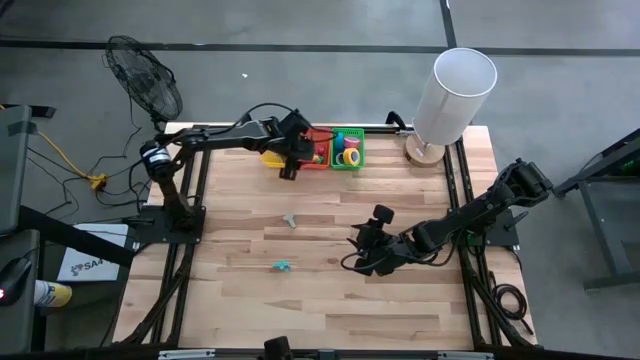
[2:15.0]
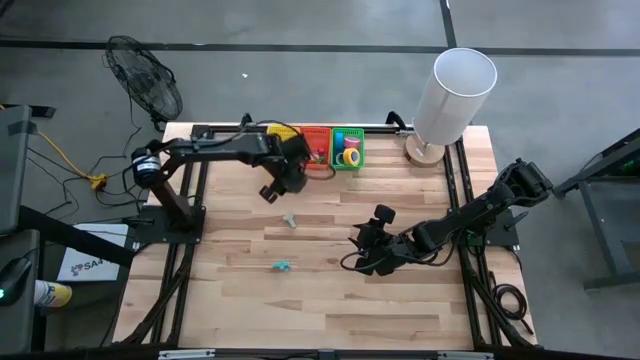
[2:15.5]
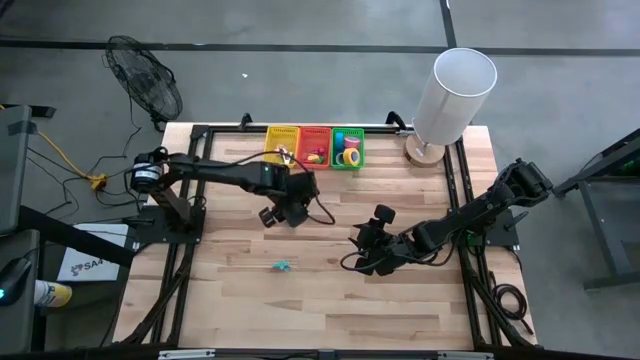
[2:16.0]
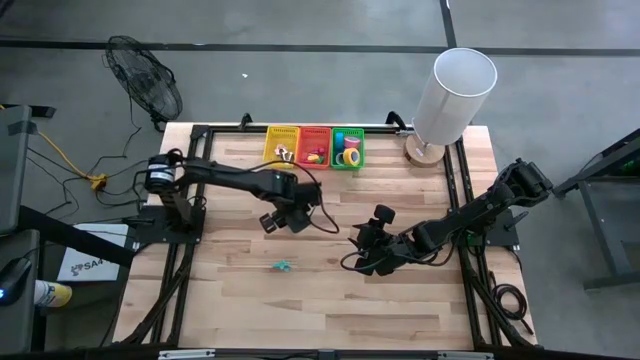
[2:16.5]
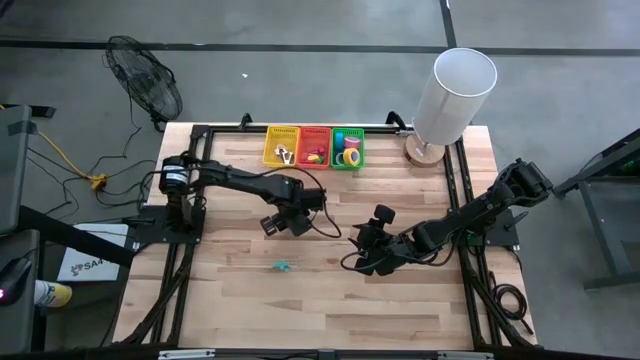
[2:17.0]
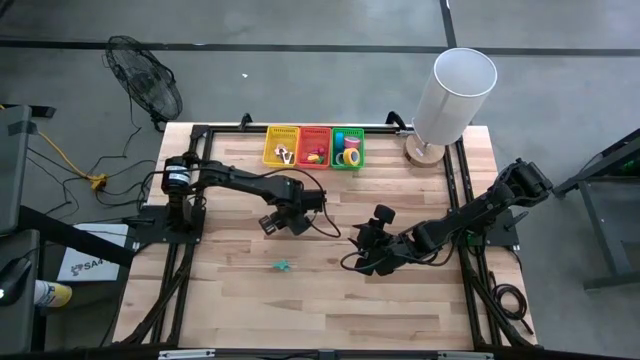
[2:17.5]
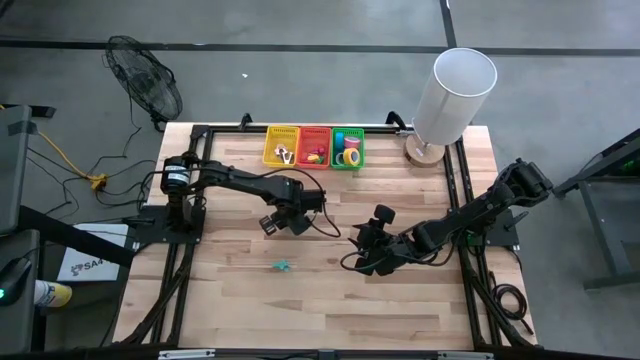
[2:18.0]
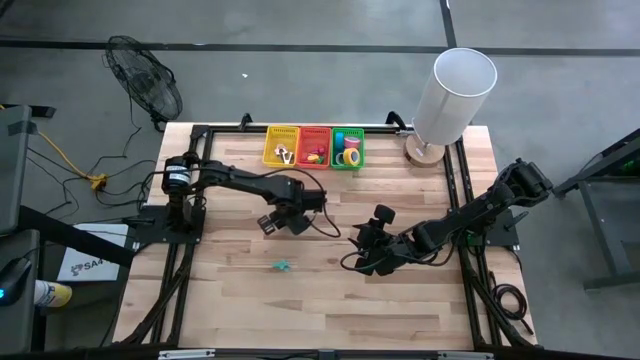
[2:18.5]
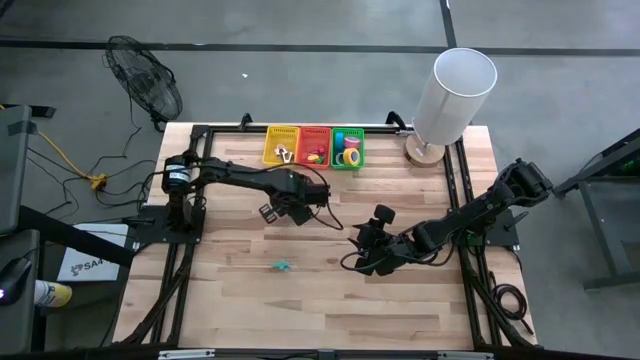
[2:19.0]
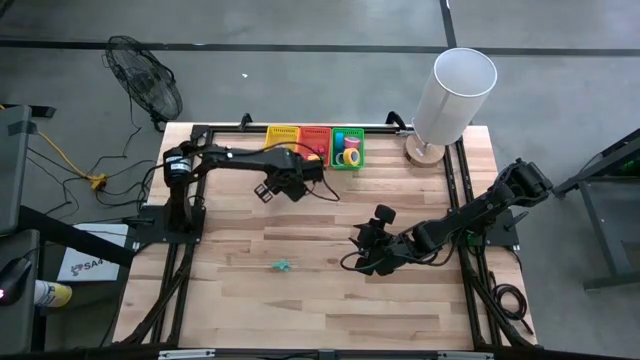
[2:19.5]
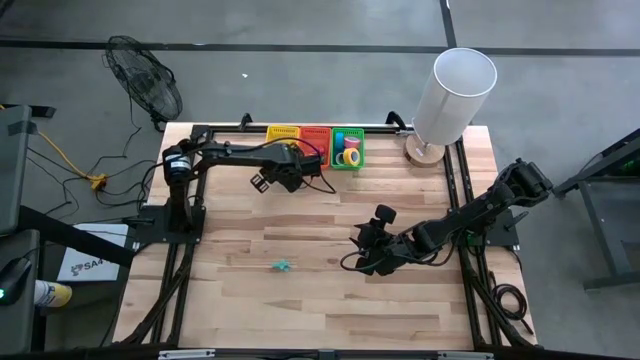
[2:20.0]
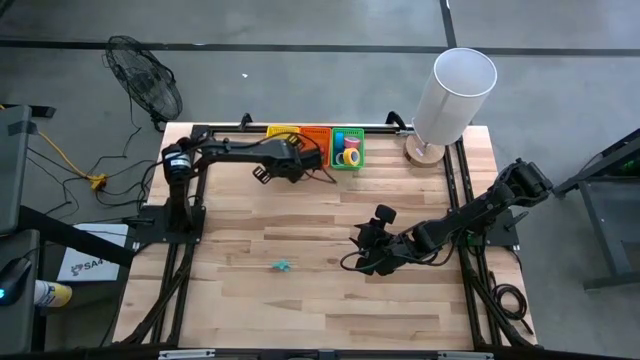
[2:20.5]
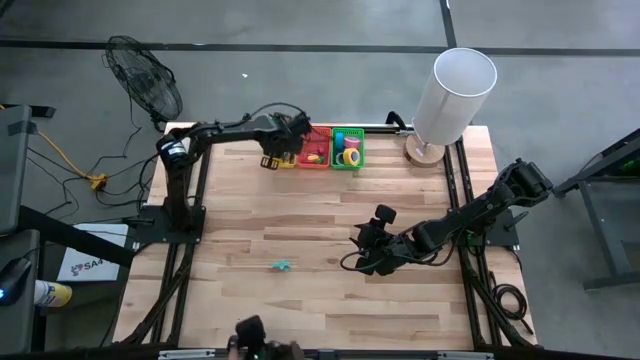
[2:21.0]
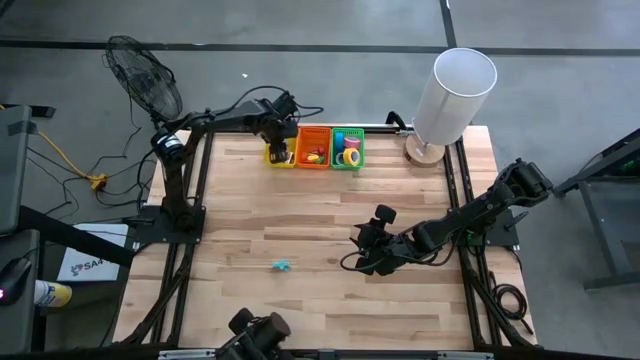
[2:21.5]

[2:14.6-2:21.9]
Task: Pick and place Stapler, Stapler remover, tape
Put the gray staple remover into the yellow basket

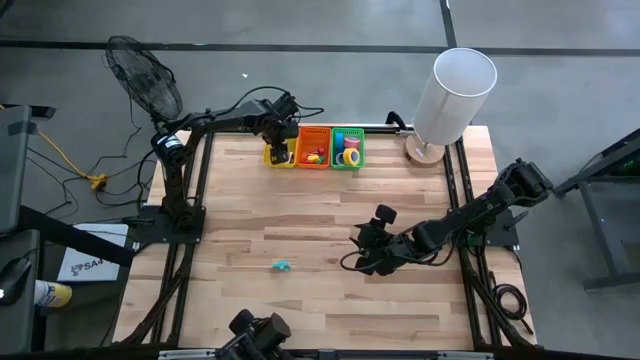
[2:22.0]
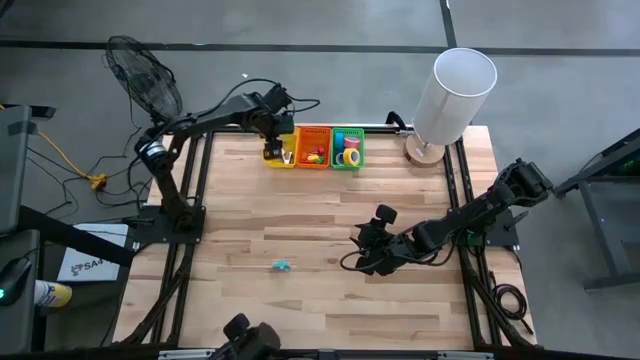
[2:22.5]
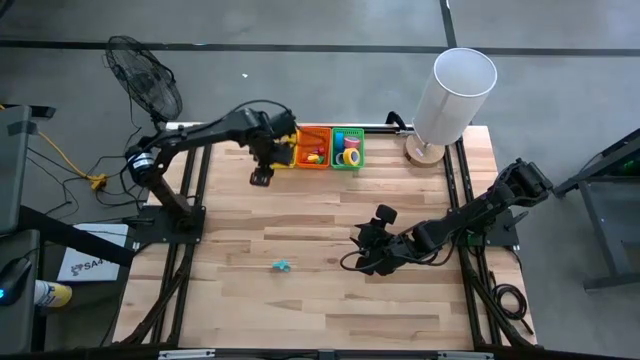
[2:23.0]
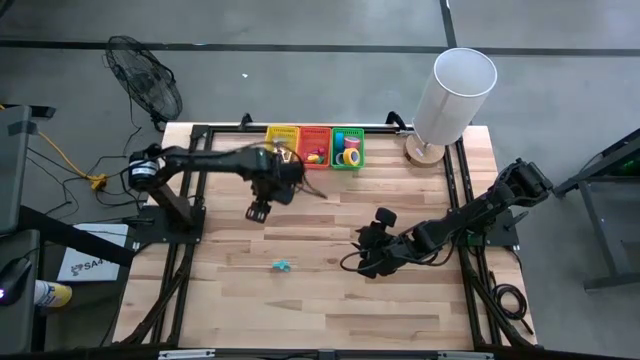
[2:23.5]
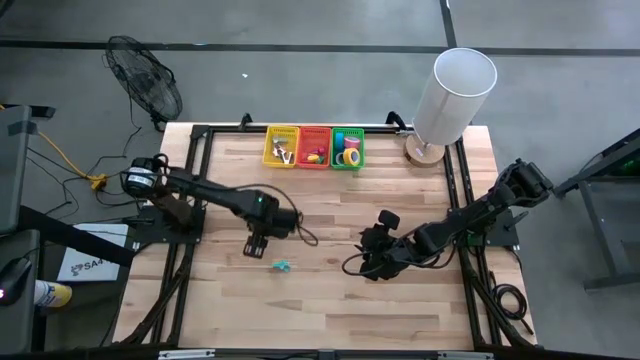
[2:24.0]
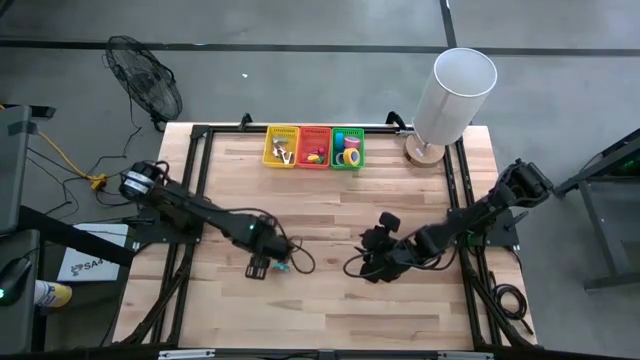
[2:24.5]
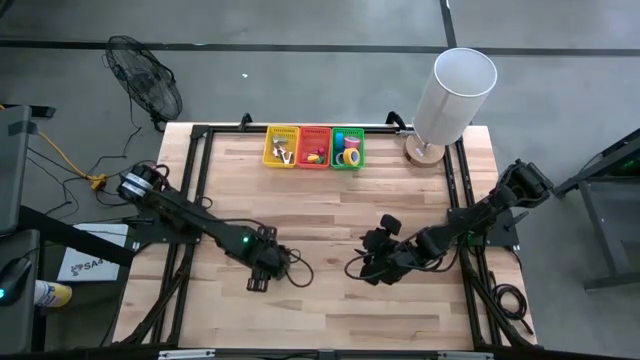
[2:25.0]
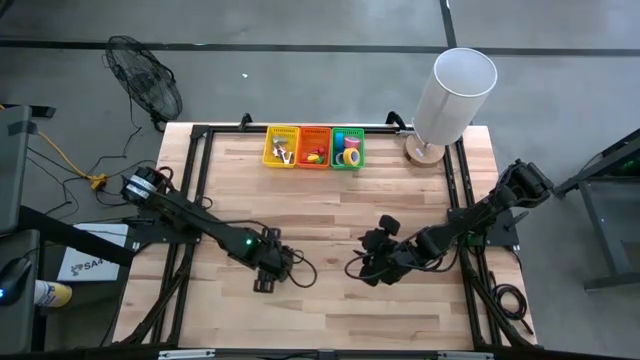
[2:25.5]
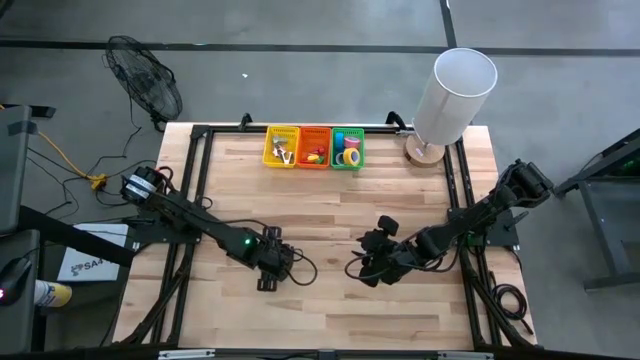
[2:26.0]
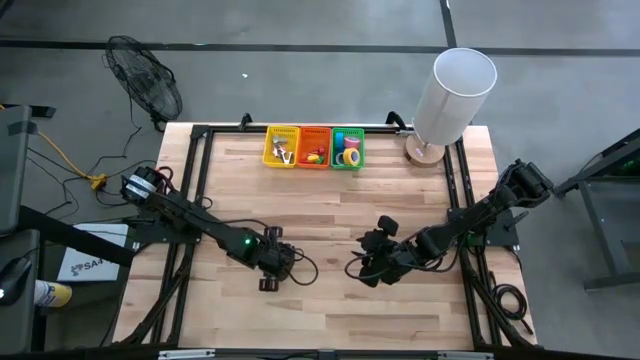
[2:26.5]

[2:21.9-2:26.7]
Put the light blue staple remover into the yellow basket

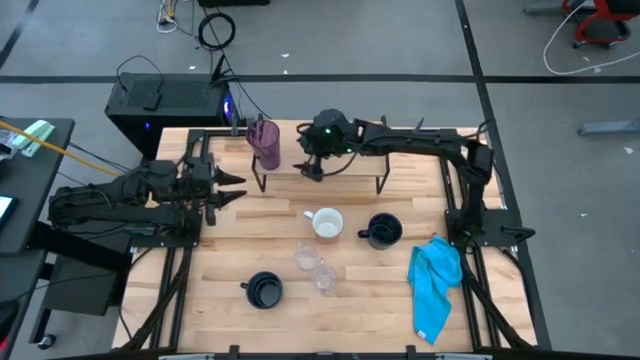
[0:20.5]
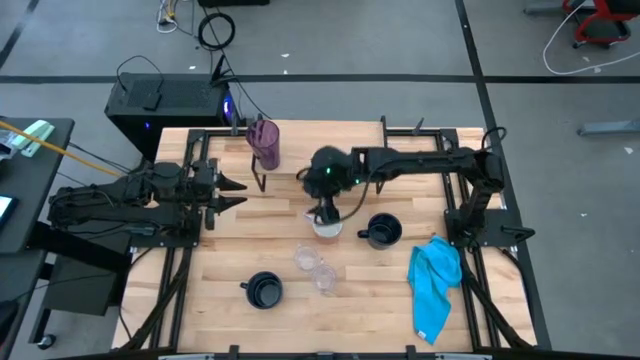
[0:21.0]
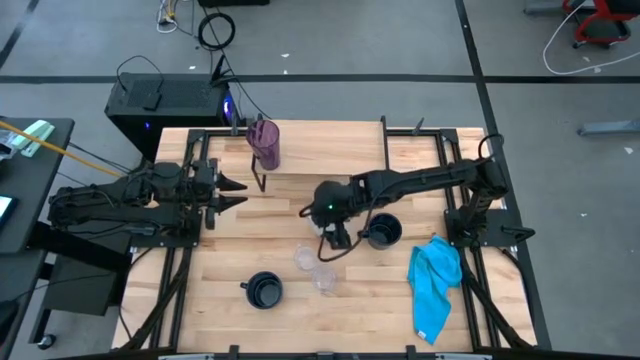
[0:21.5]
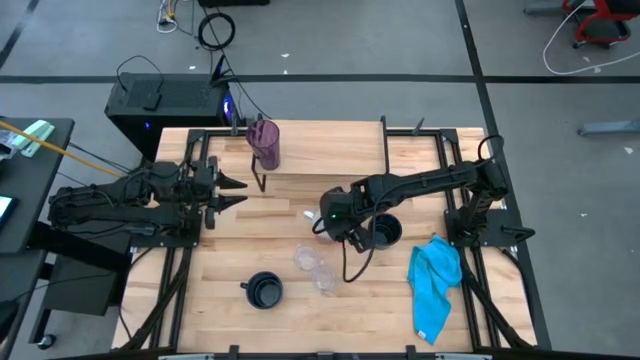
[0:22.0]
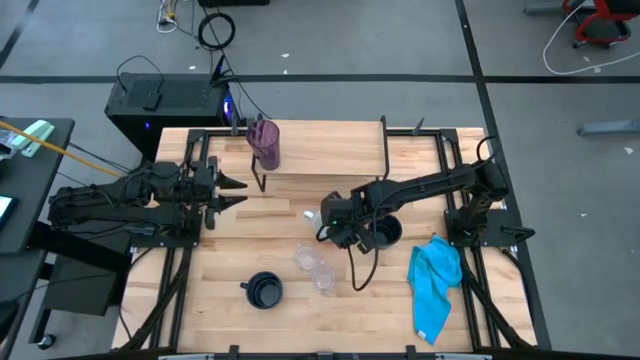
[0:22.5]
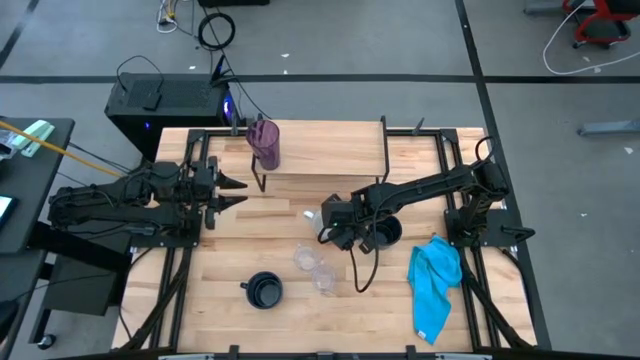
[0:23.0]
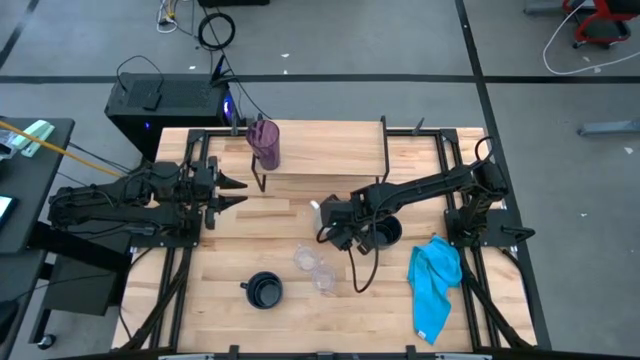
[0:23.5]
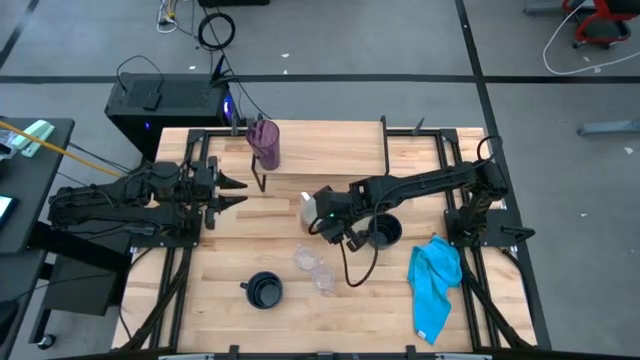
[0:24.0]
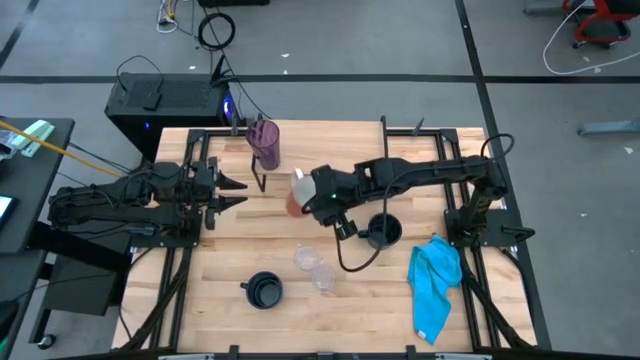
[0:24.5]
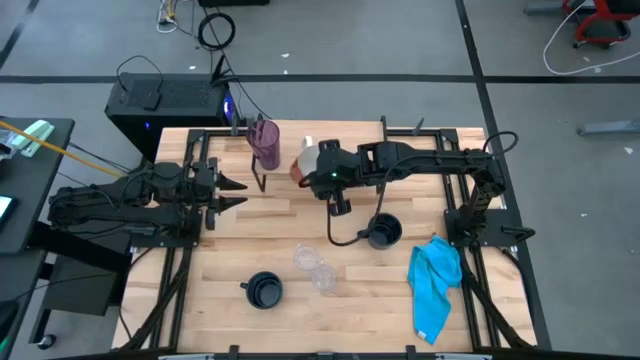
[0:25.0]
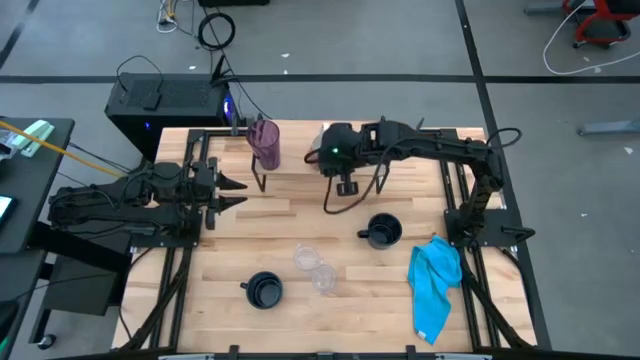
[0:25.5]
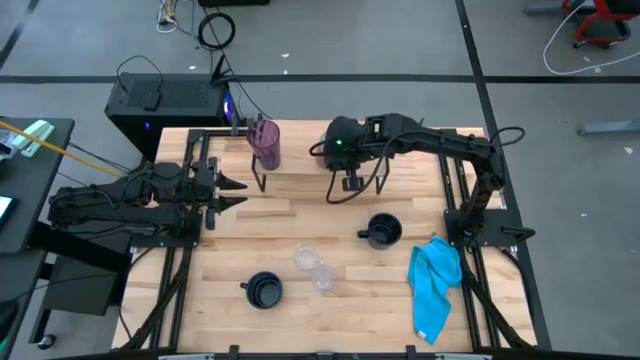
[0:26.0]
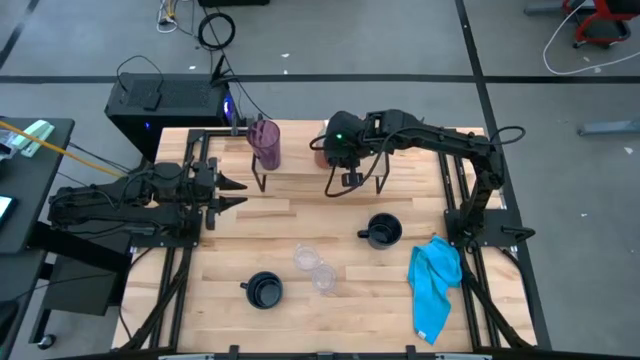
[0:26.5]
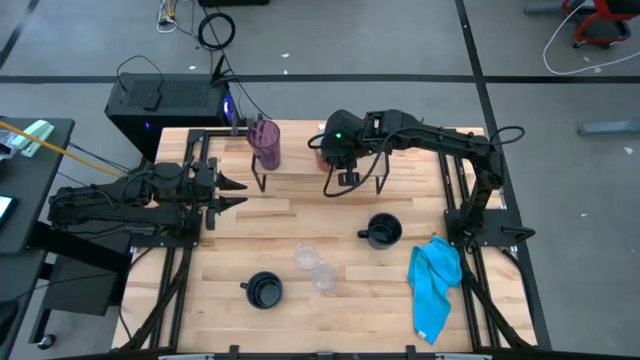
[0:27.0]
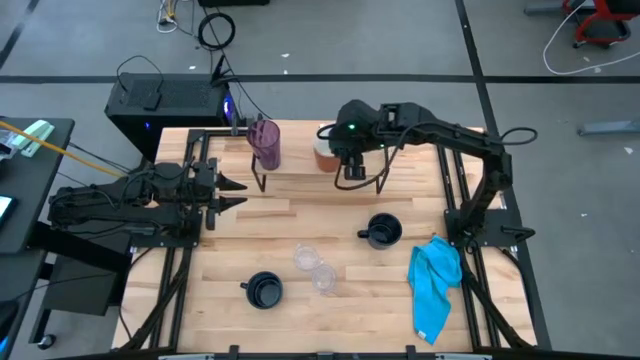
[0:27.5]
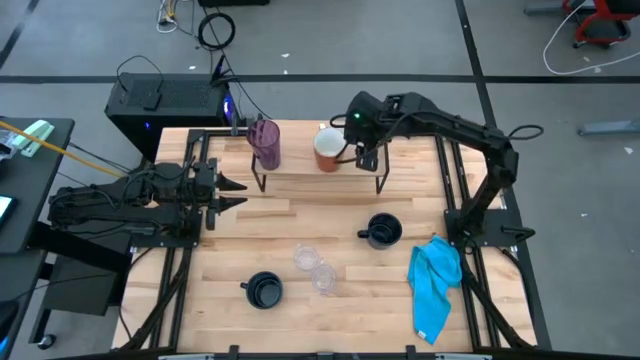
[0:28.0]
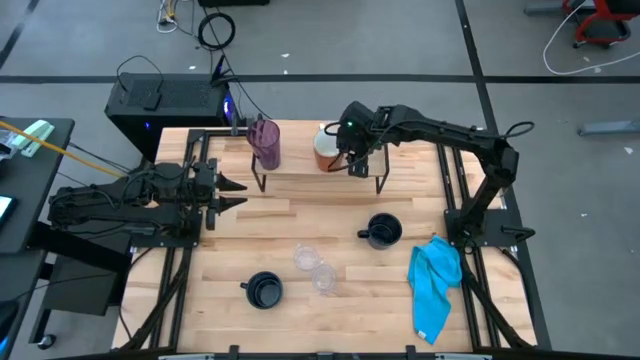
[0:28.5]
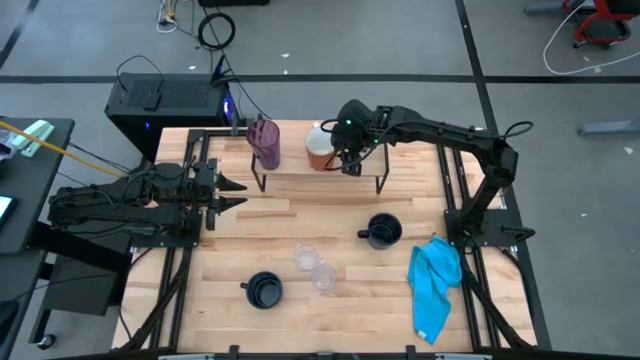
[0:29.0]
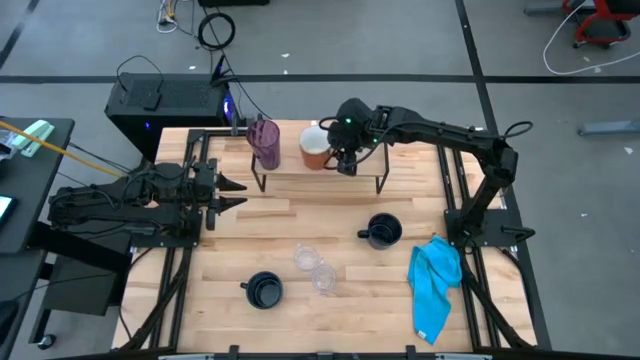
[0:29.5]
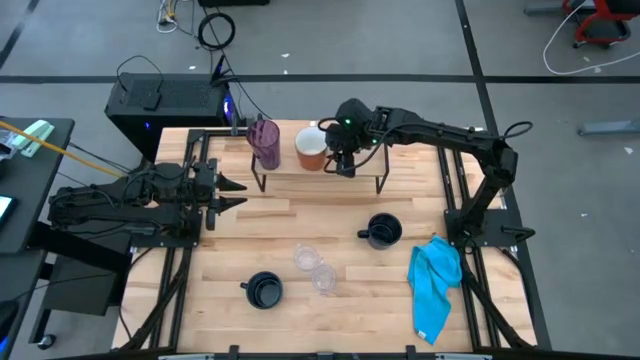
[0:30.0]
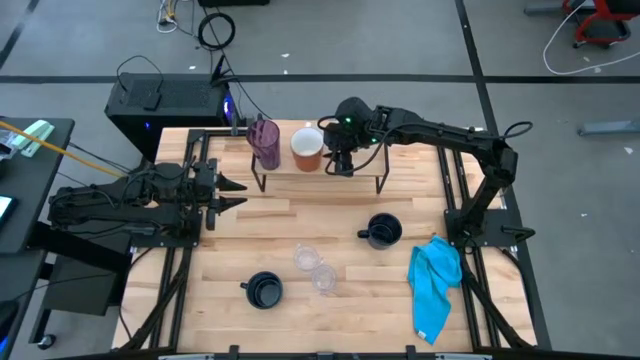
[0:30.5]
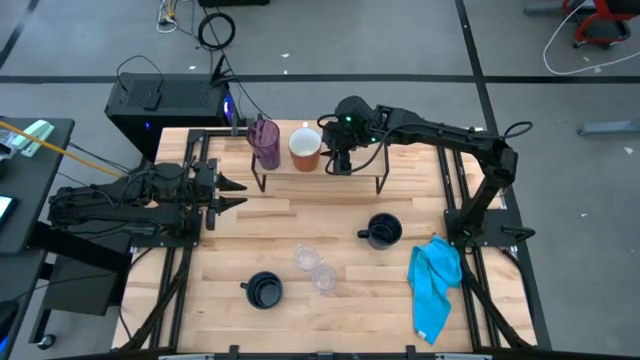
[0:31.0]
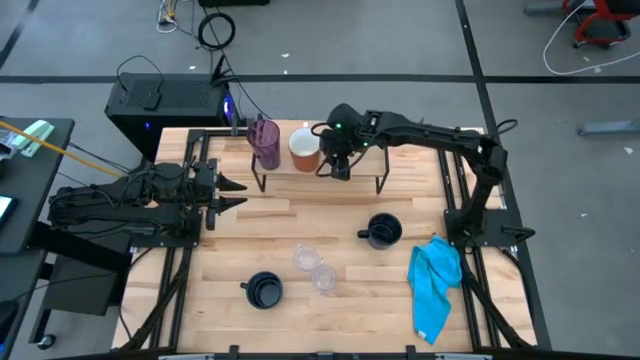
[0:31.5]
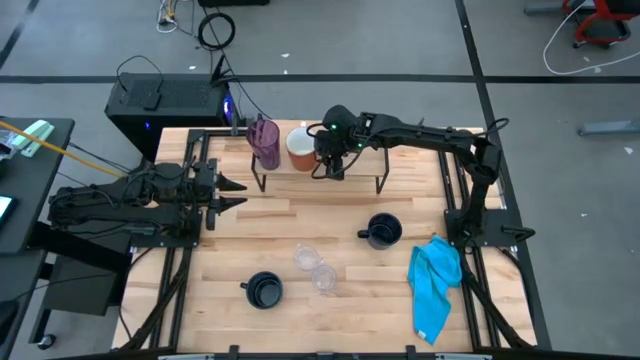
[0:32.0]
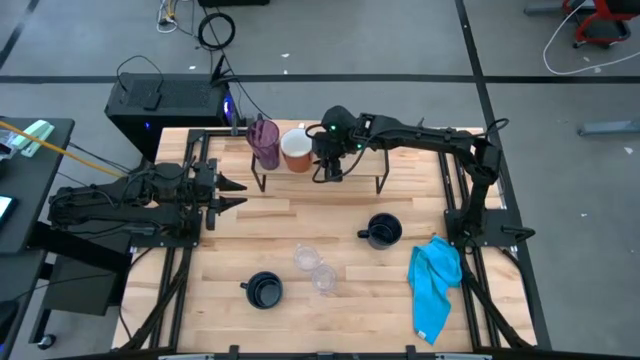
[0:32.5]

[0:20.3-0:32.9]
Task: Stack small to large cups/mugs on shelf
Put the orange mug on the shelf
